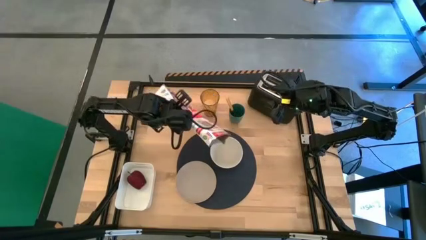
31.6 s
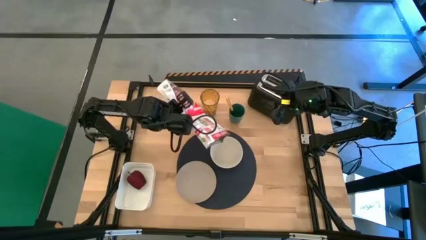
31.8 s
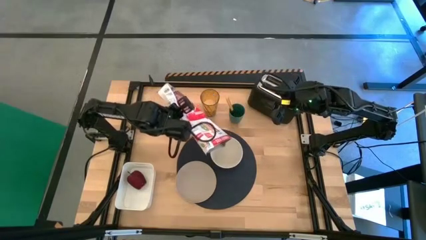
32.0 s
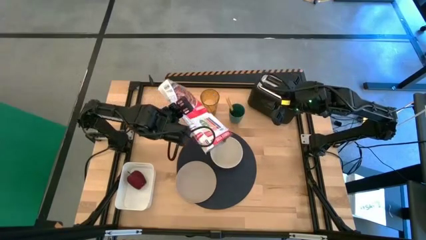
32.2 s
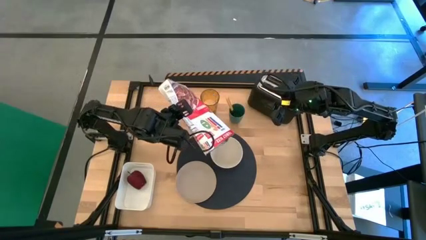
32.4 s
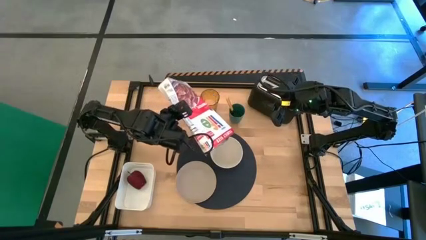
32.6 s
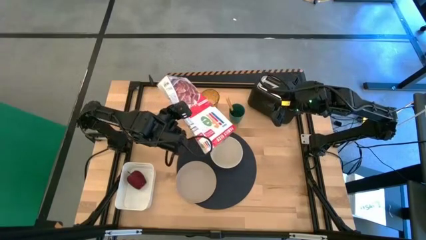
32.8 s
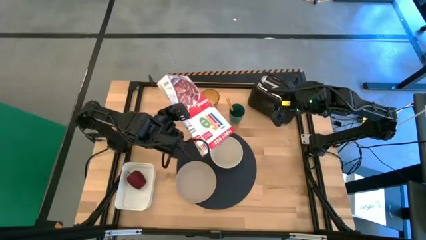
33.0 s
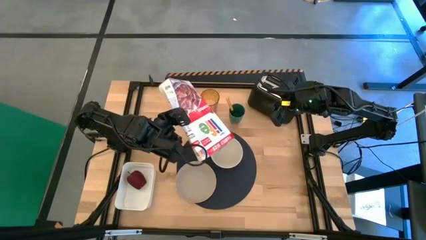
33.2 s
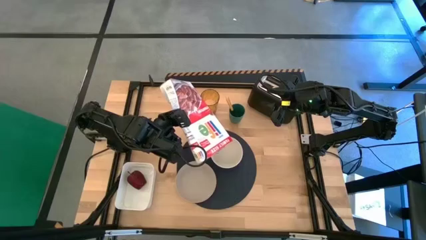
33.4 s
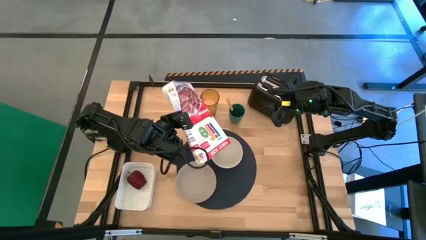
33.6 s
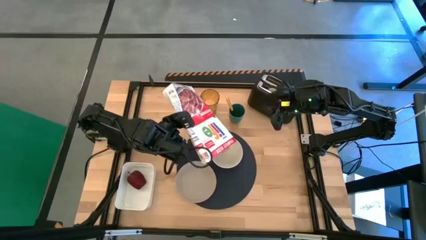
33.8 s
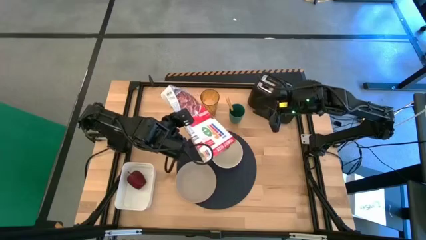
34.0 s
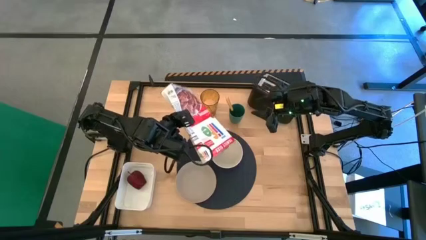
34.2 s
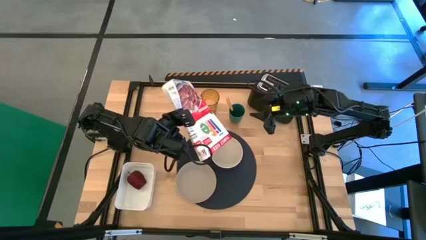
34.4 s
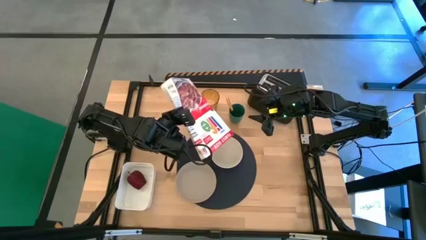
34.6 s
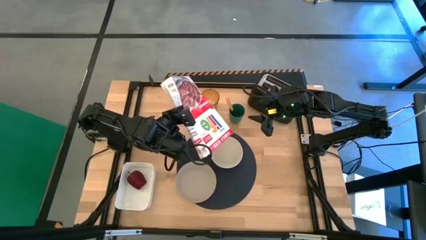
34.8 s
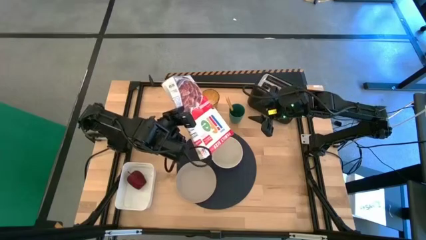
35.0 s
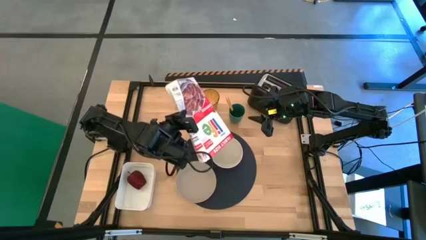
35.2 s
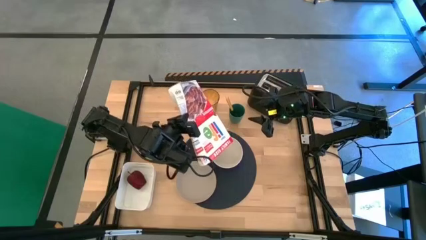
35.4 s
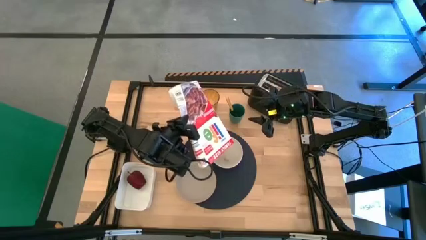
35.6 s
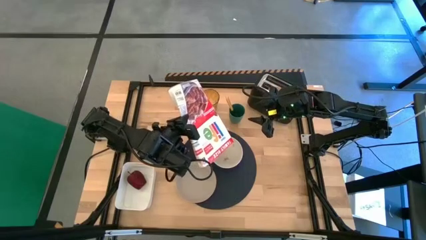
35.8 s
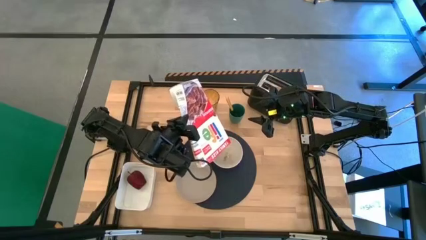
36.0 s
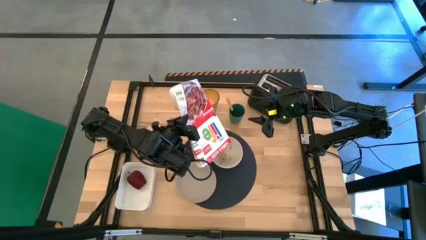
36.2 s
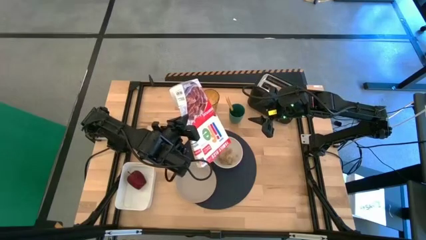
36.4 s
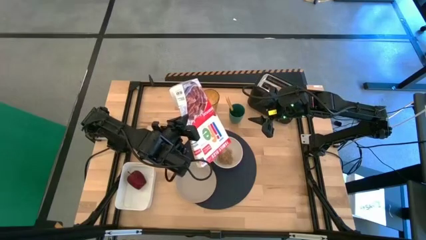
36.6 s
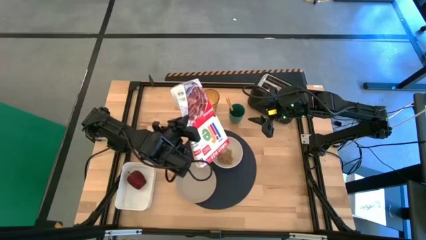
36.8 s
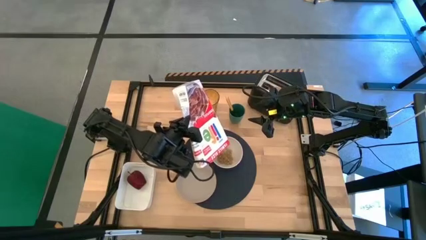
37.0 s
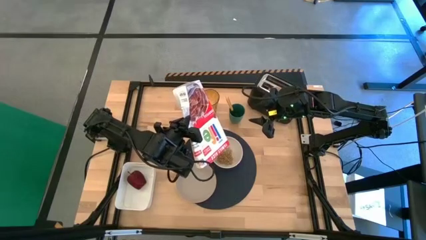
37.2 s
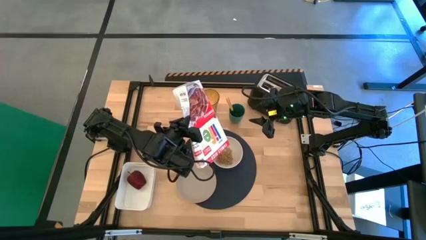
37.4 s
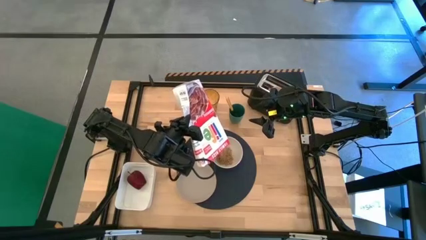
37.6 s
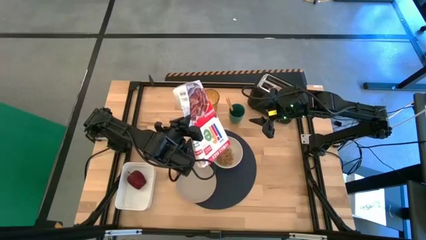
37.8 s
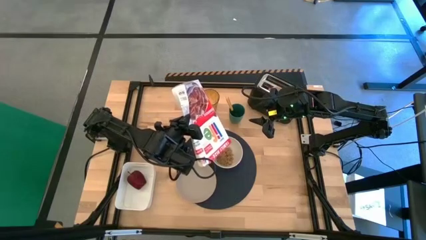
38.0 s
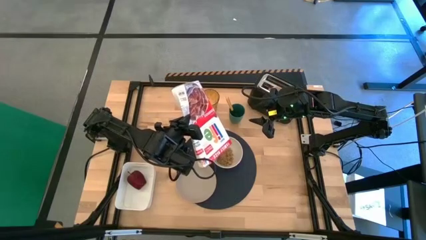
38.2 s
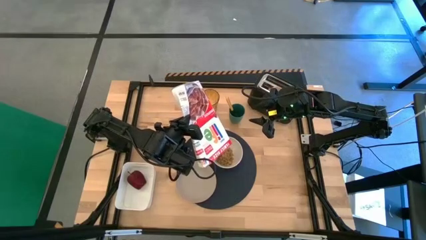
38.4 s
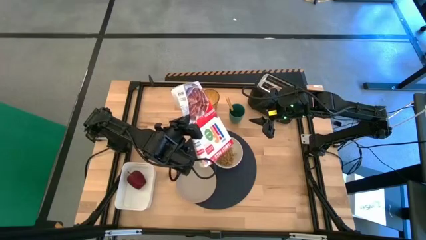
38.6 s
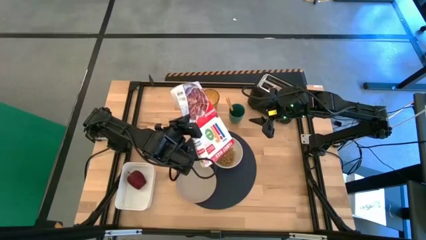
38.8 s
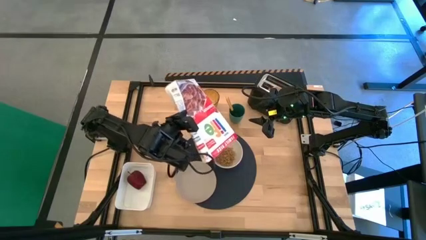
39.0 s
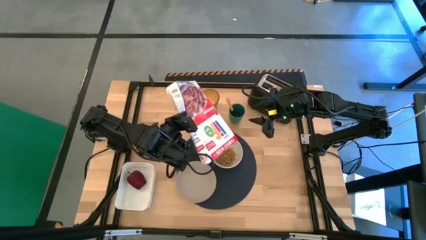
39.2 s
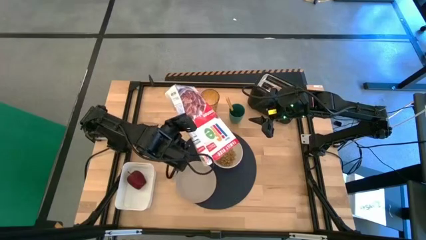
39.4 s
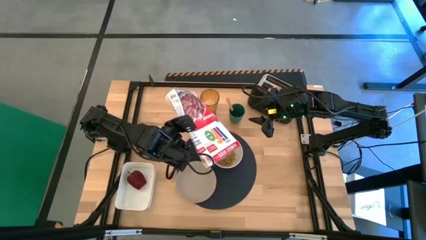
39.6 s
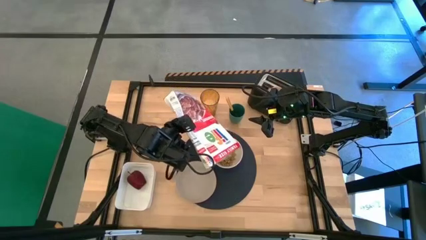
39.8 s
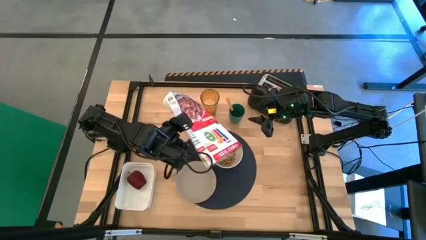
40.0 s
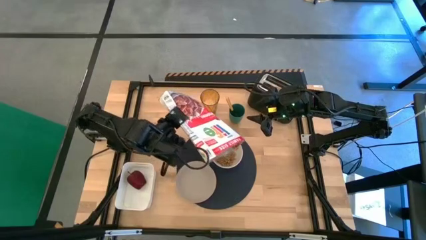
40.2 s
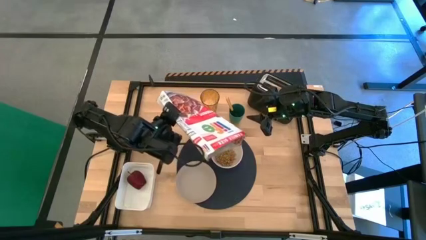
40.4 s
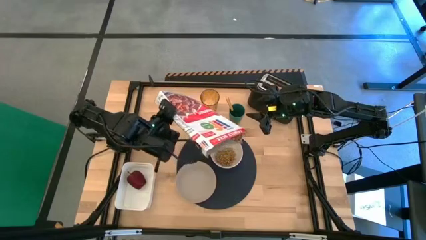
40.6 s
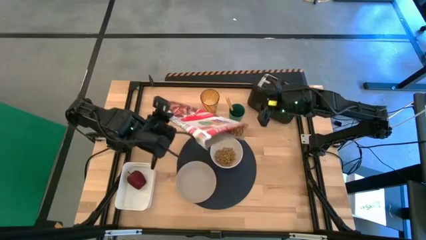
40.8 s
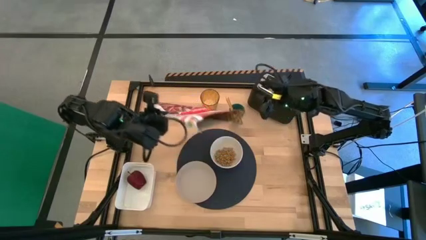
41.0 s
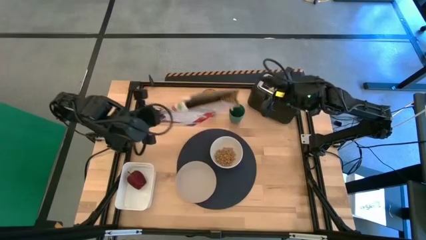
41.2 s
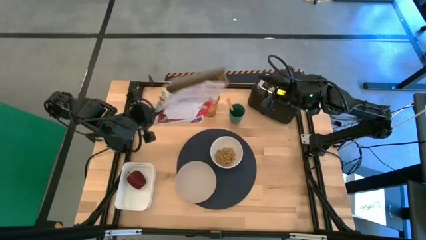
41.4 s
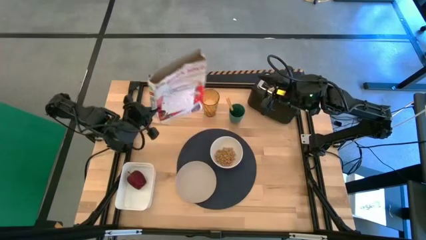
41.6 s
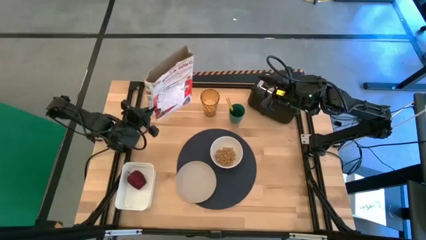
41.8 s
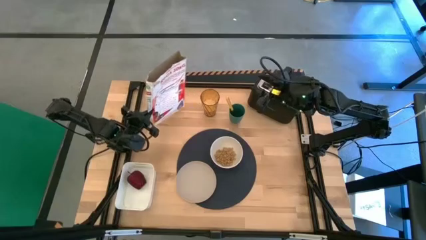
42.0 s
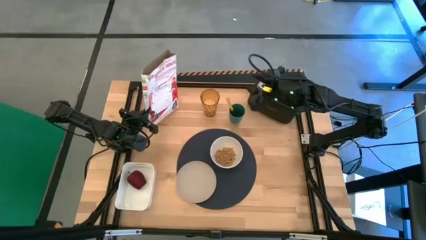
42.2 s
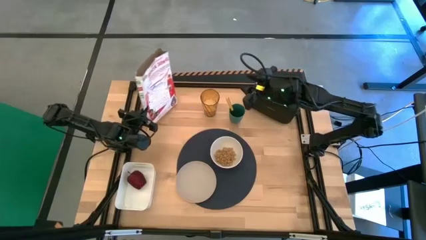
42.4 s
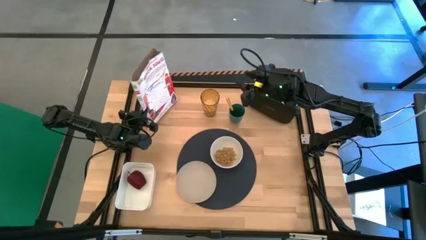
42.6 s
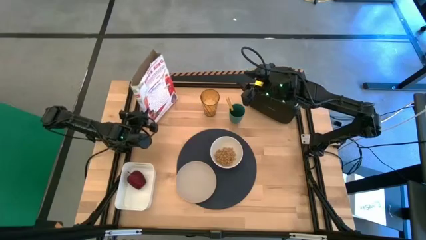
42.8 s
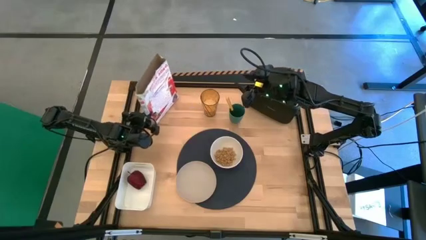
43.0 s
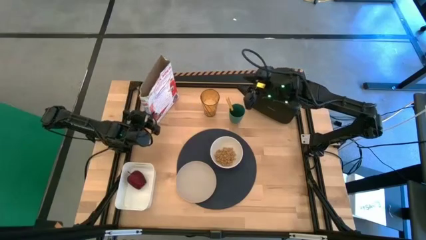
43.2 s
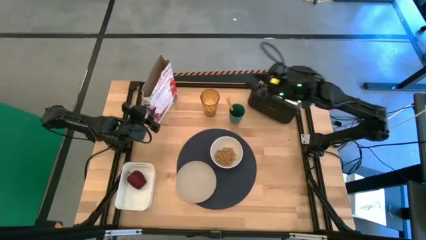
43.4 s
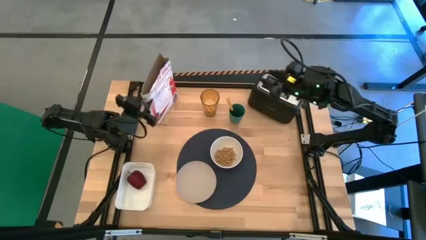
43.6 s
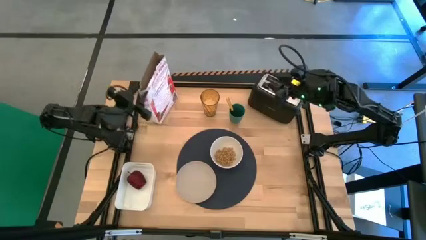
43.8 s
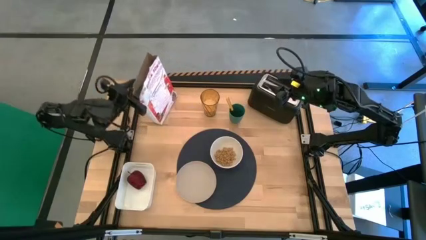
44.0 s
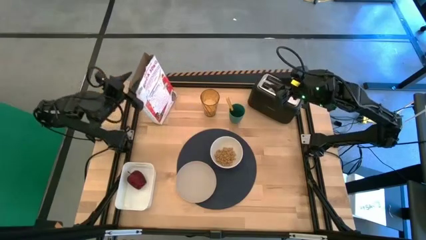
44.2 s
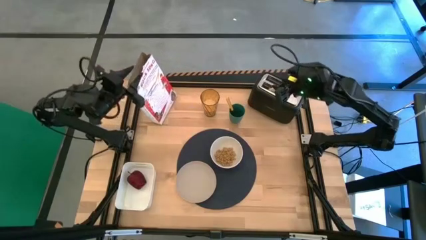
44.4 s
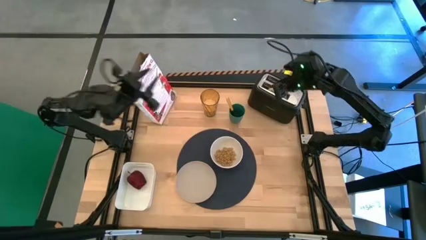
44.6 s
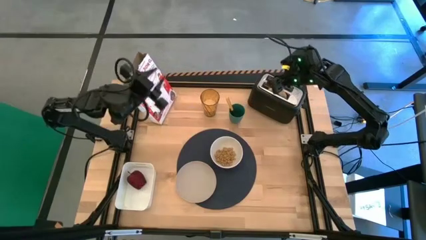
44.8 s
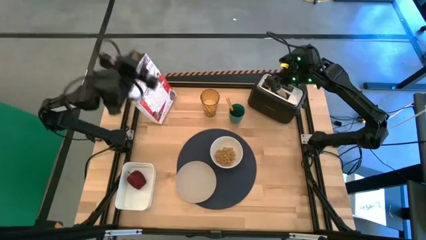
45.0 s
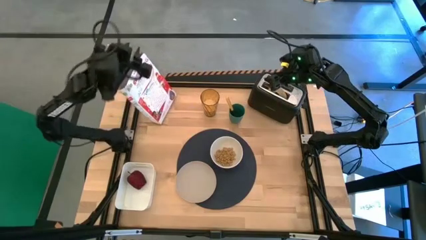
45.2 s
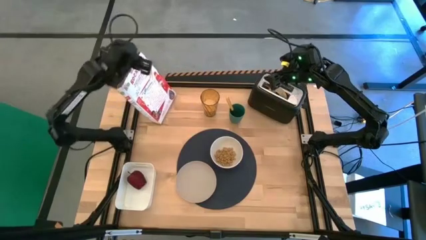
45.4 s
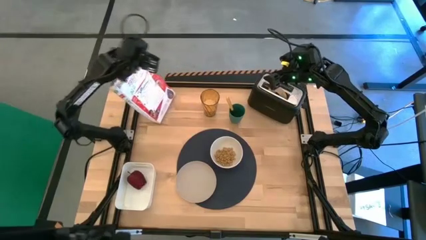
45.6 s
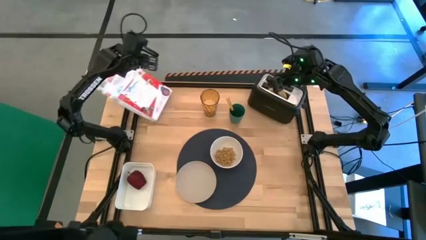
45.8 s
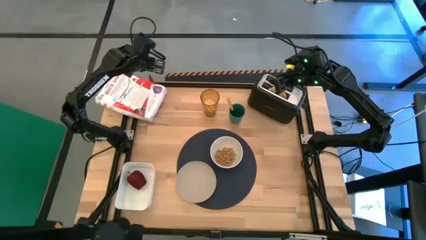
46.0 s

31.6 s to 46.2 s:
Task: Arrange a breakfast setting
Pour the cereal from the cereal box into the white bowl
